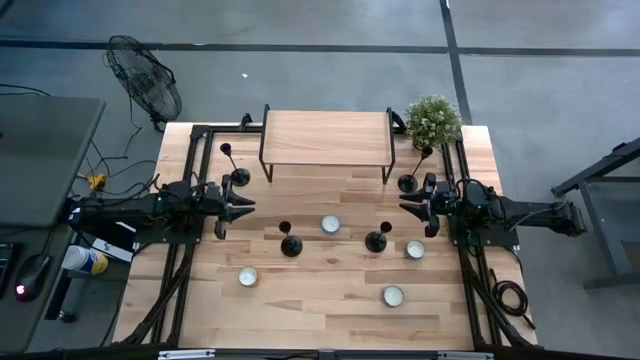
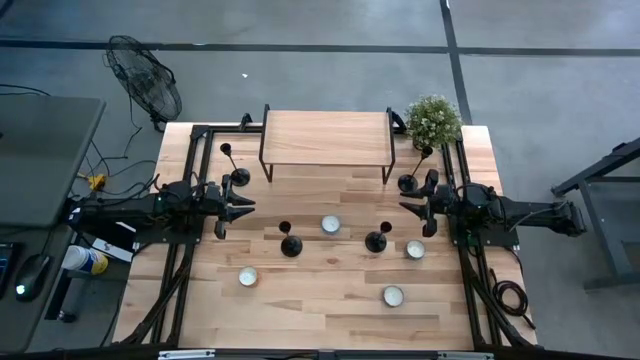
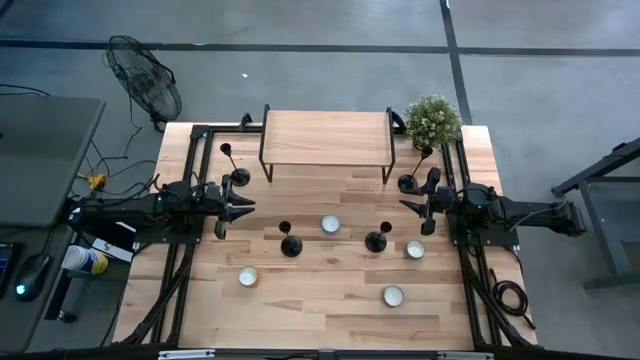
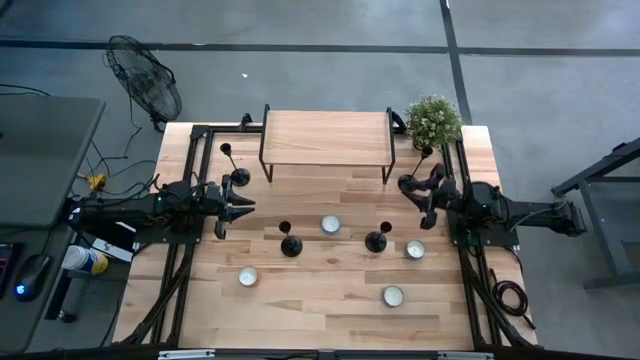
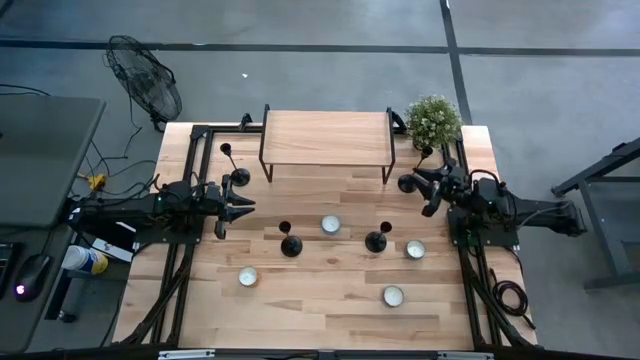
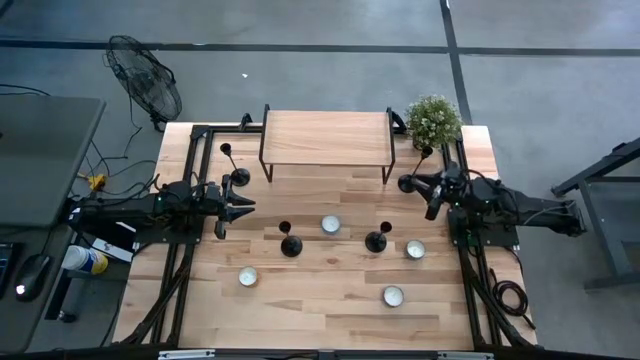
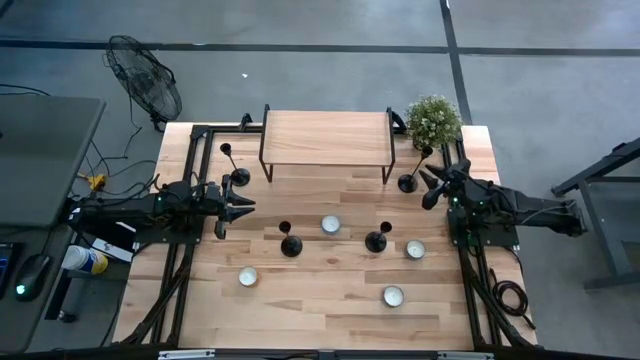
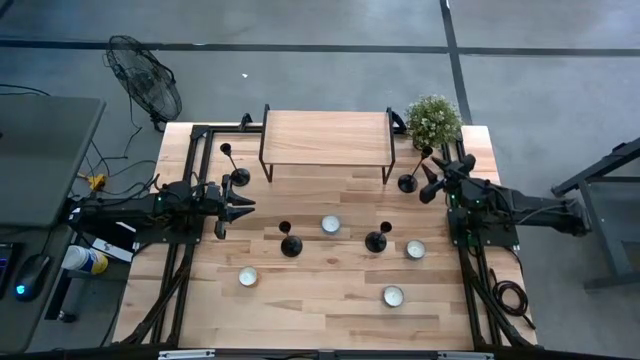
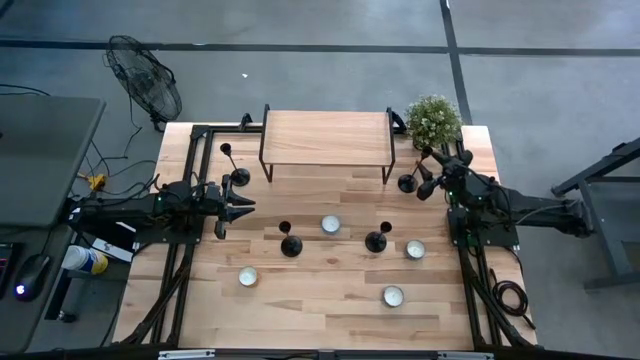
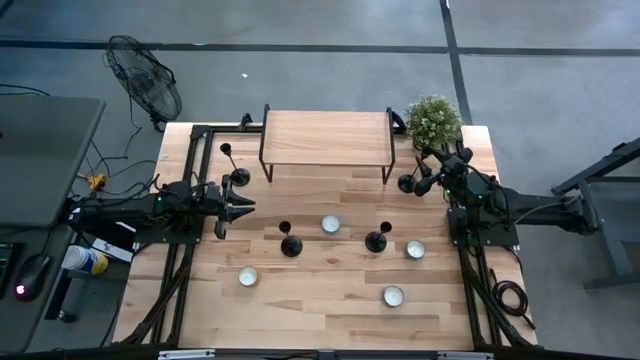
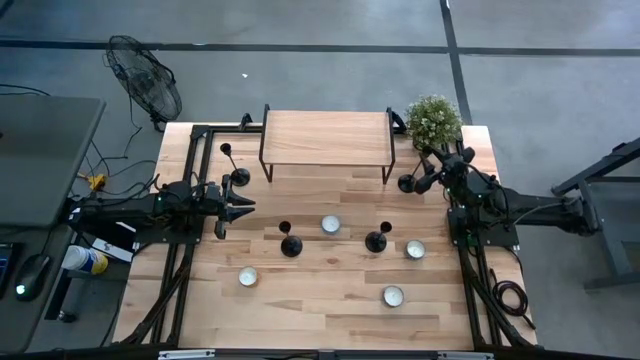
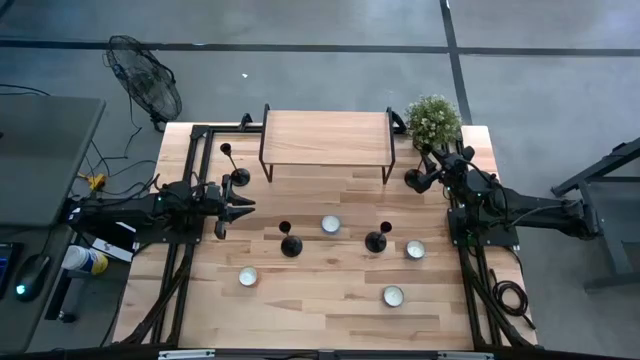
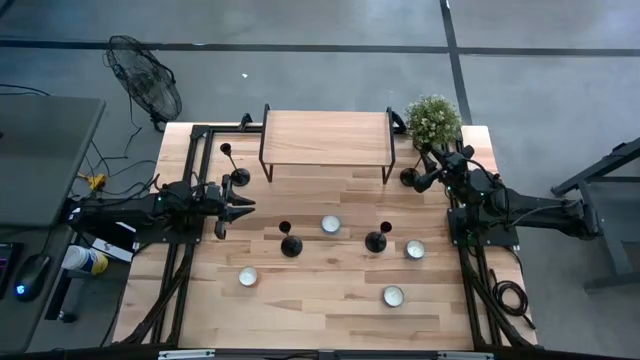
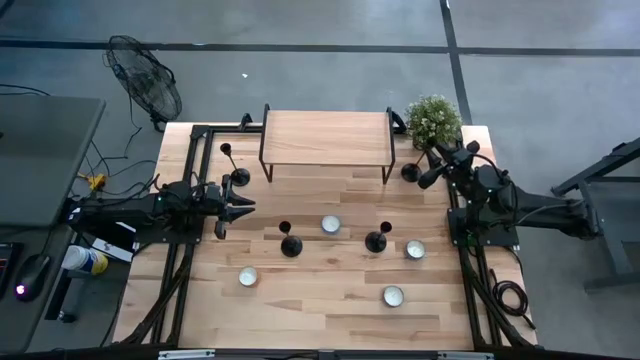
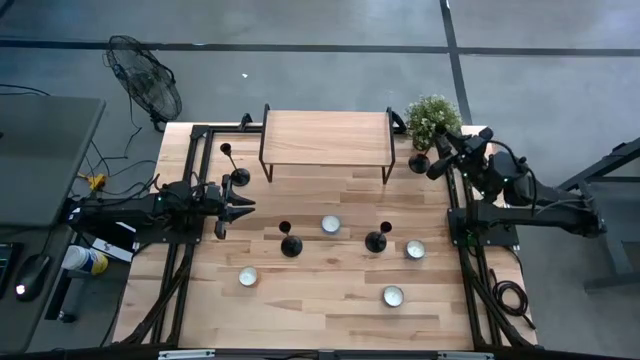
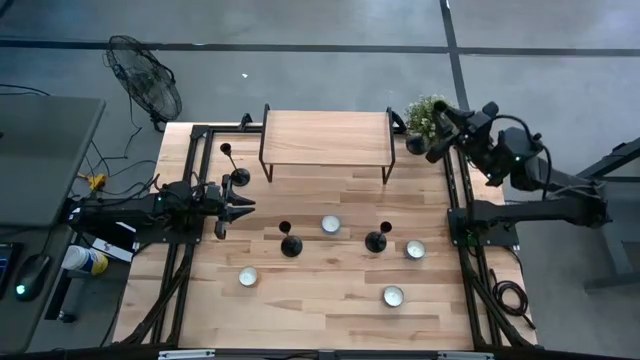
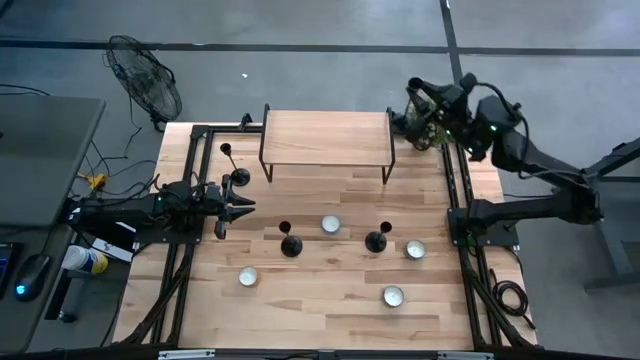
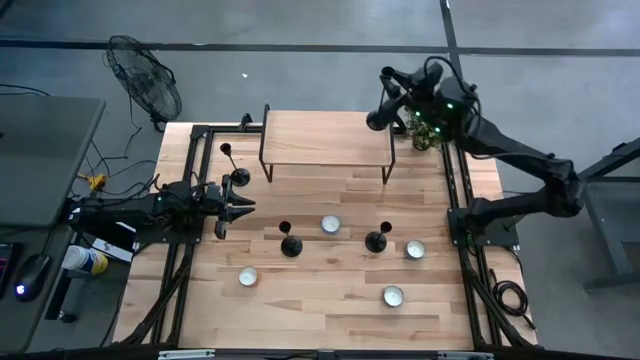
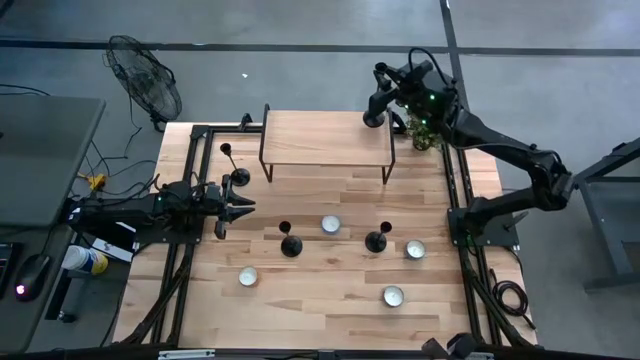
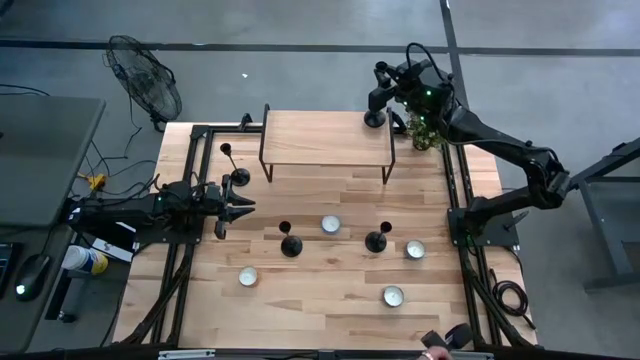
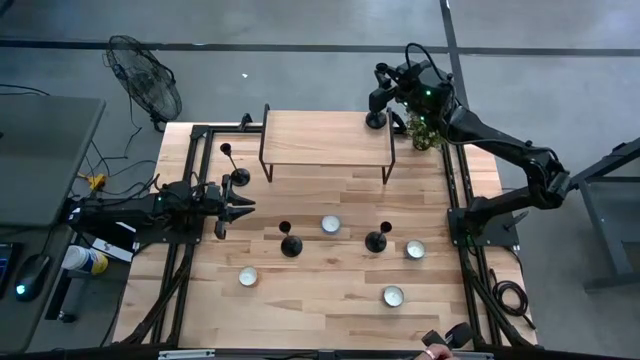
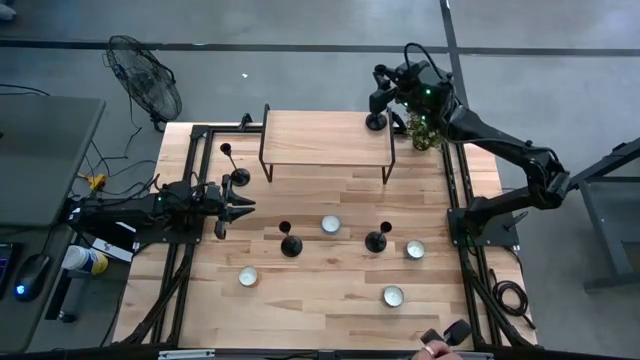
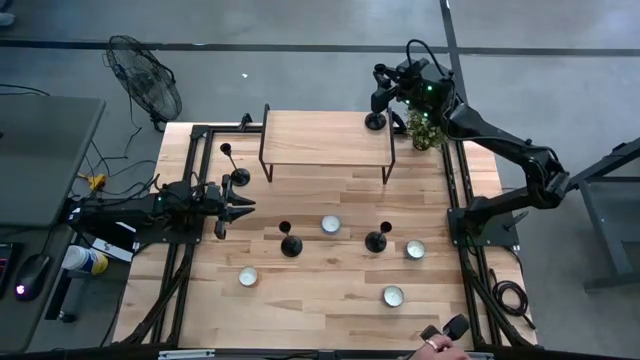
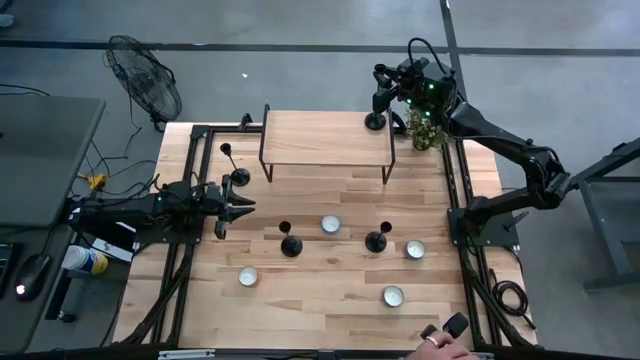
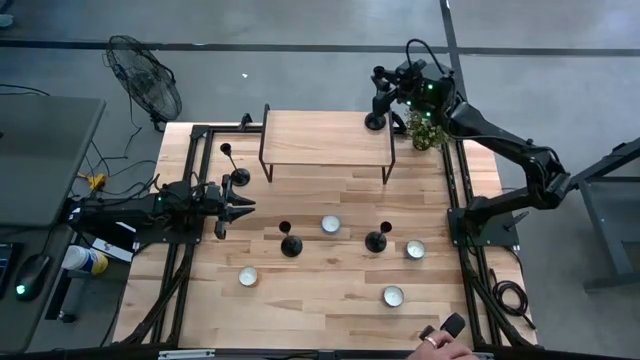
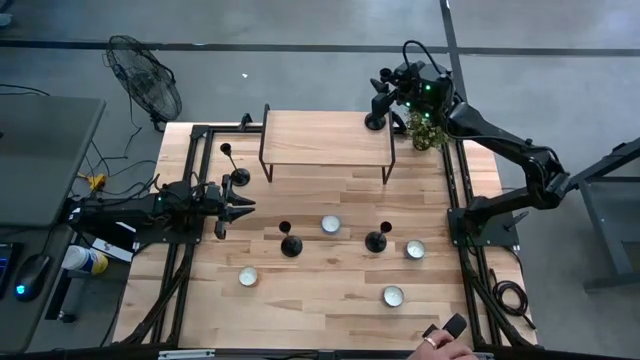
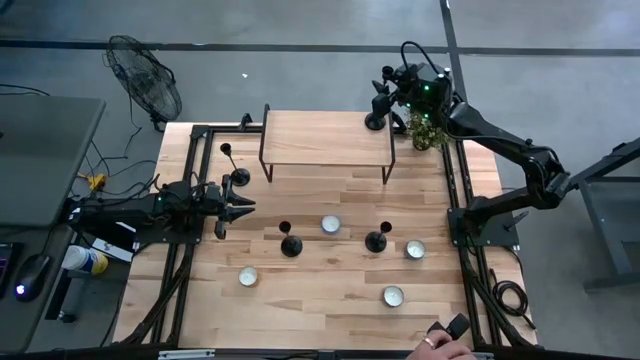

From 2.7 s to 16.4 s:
Task: Pick & Place candle stick holders
Put the black candle holder on the shelf

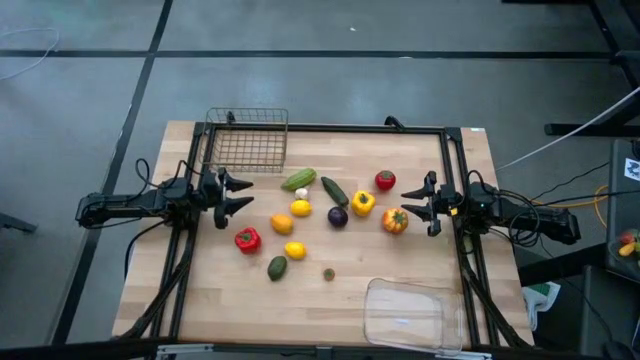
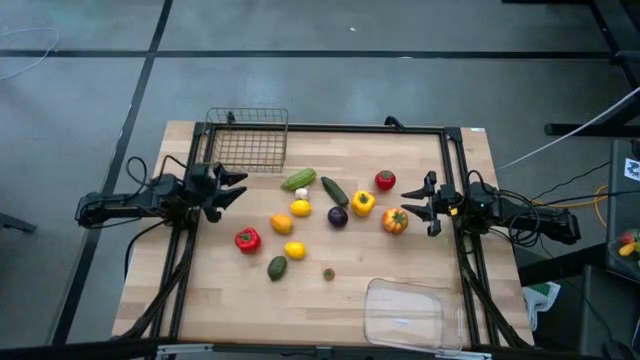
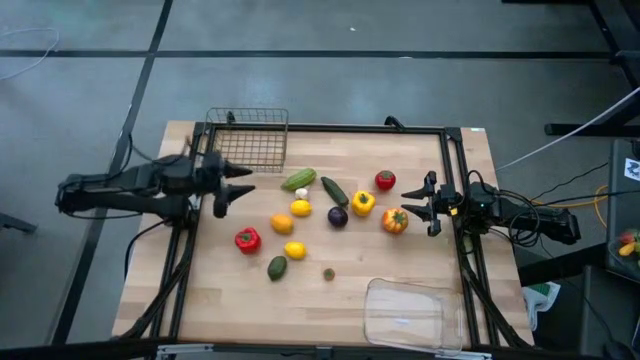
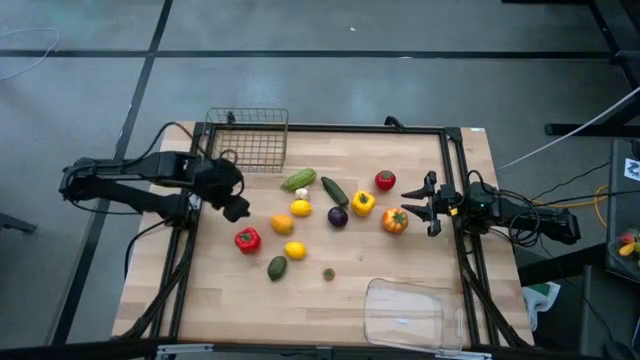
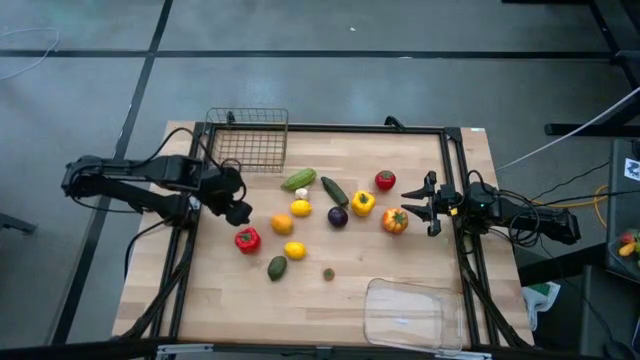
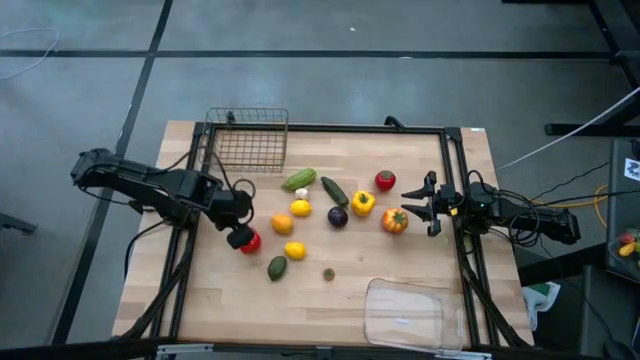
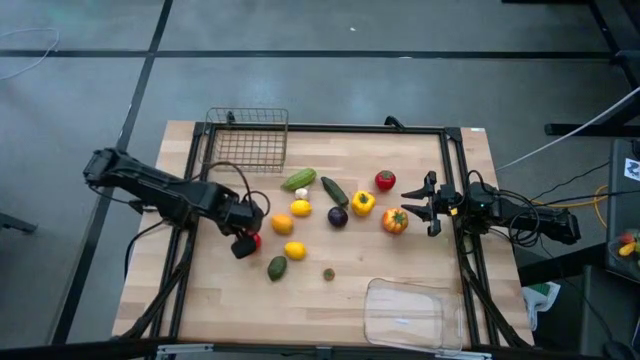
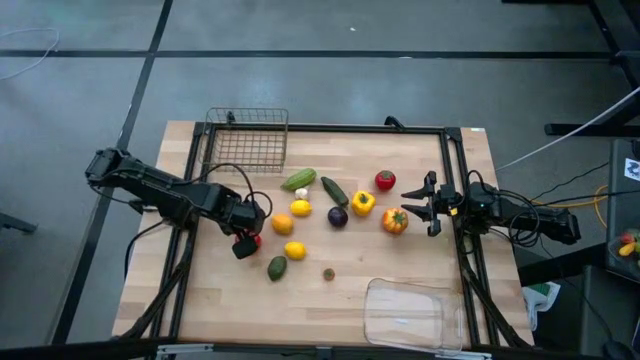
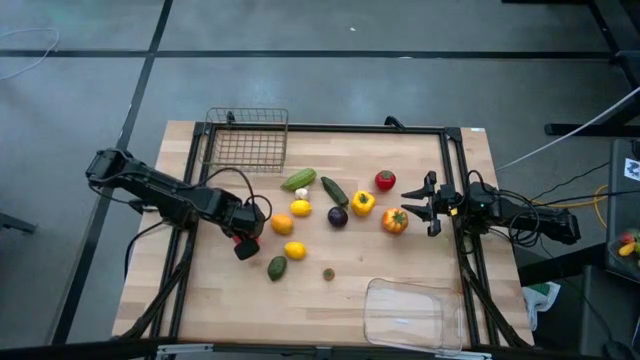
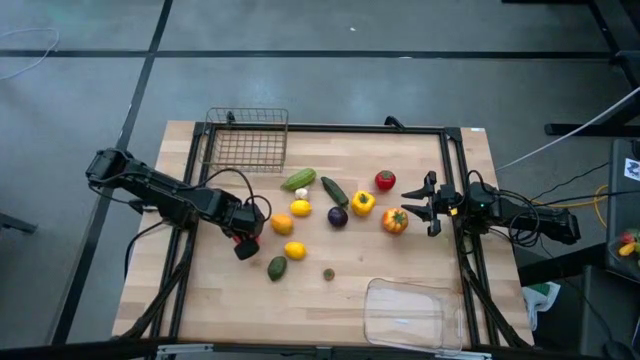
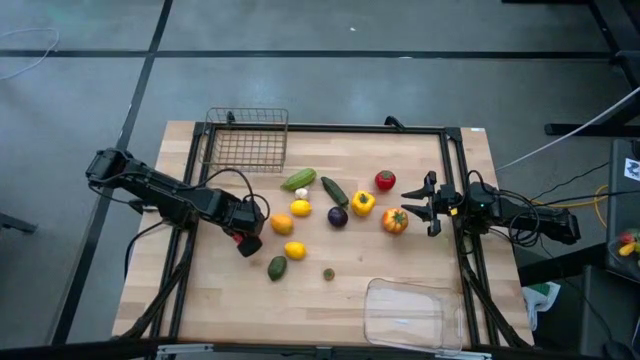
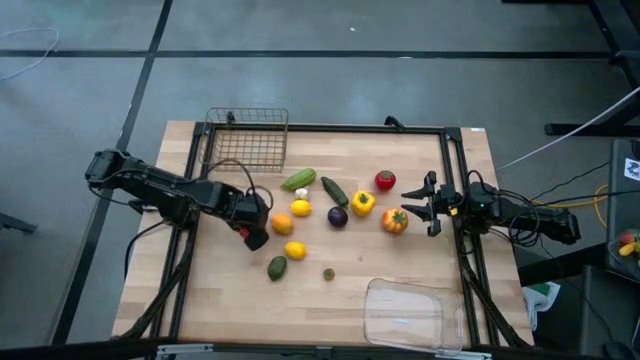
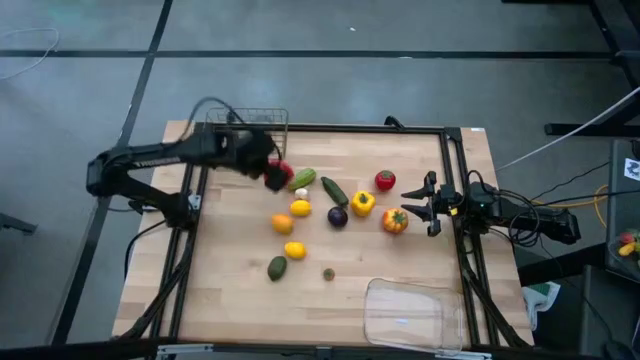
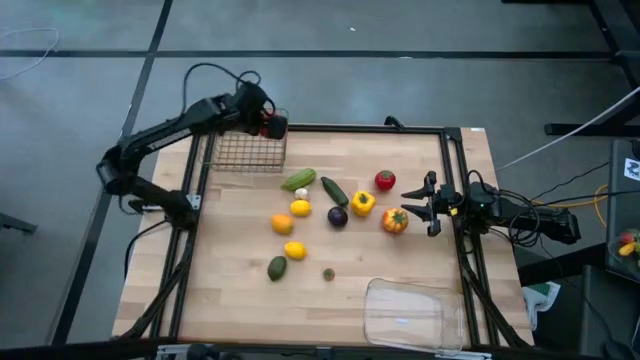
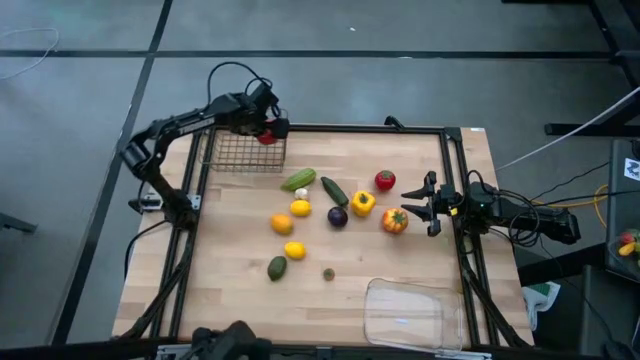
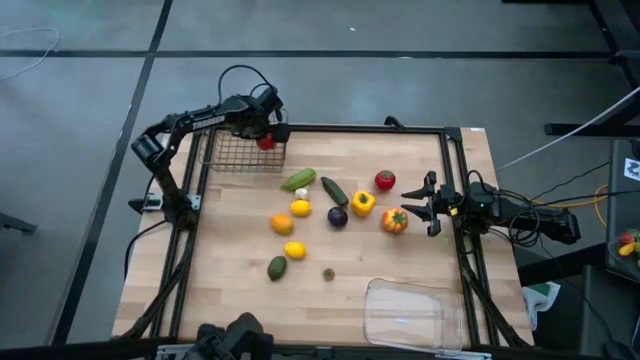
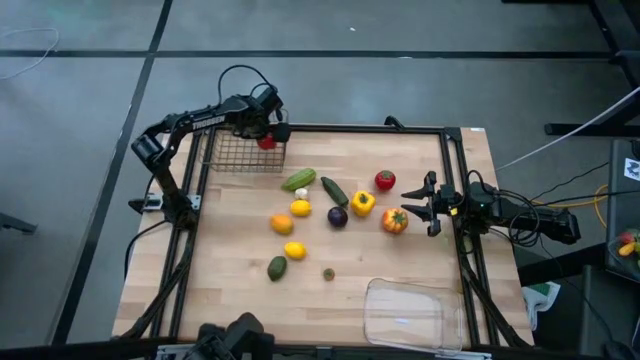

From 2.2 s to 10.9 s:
Task: Sort produce into baskets
Put the red bell pepper into the mesh basket
